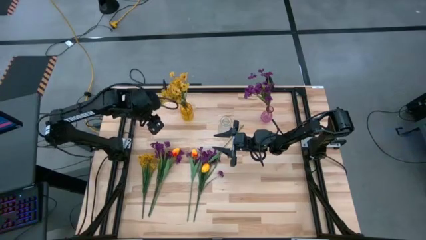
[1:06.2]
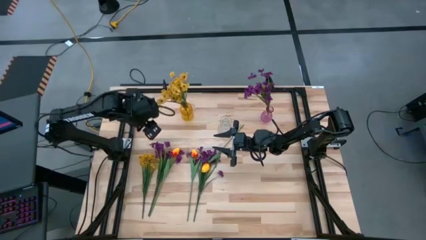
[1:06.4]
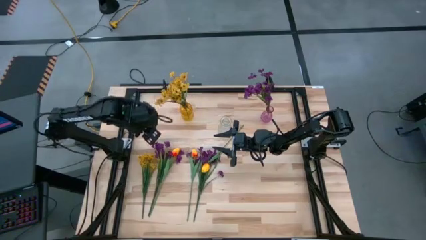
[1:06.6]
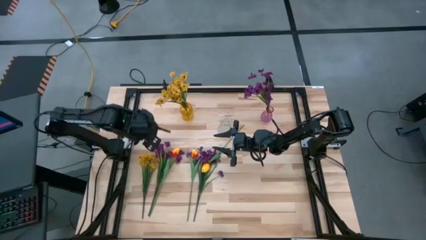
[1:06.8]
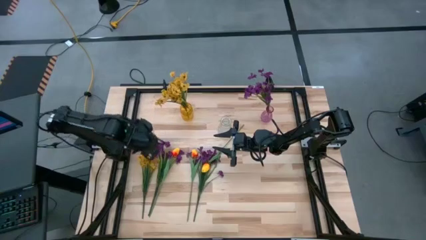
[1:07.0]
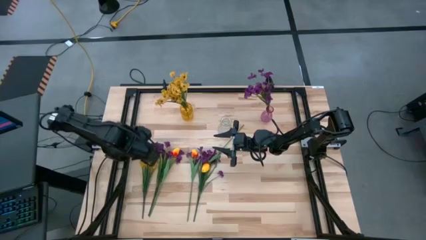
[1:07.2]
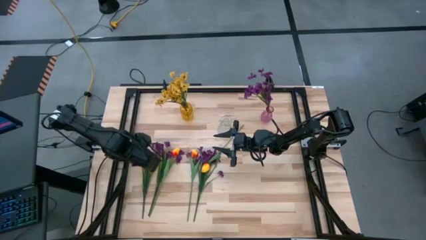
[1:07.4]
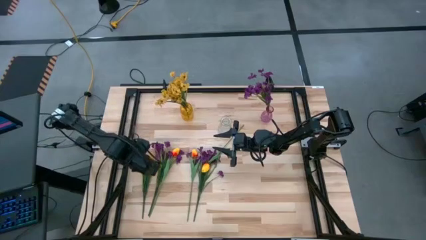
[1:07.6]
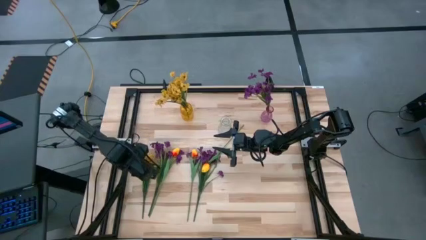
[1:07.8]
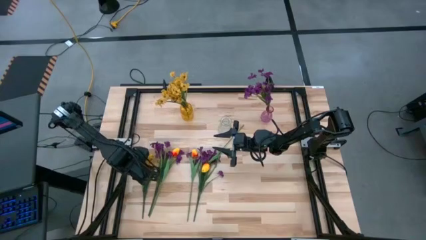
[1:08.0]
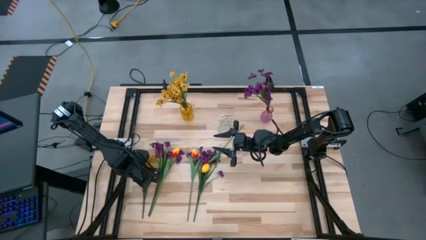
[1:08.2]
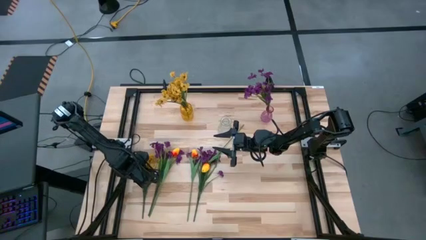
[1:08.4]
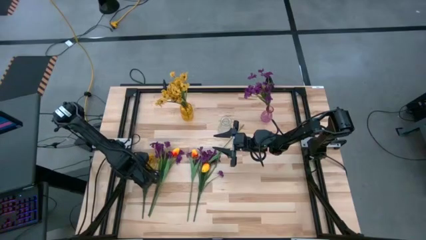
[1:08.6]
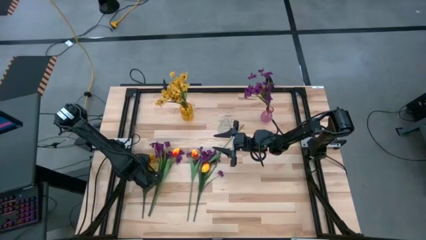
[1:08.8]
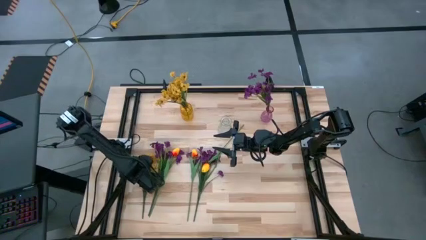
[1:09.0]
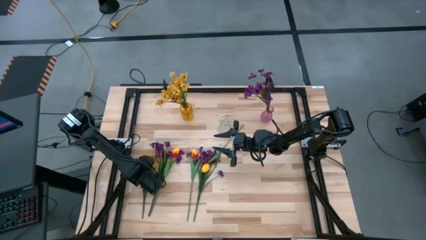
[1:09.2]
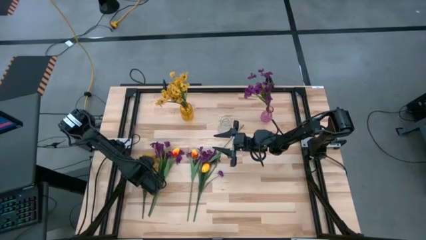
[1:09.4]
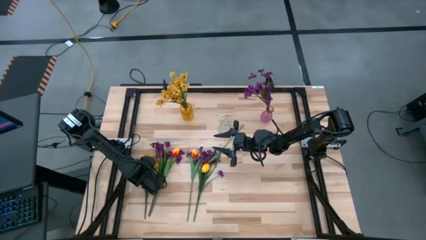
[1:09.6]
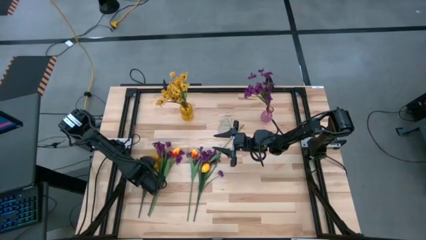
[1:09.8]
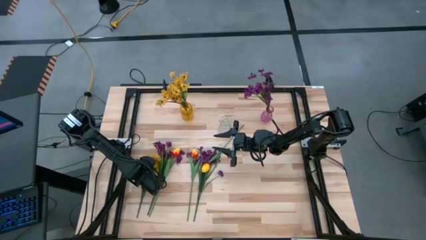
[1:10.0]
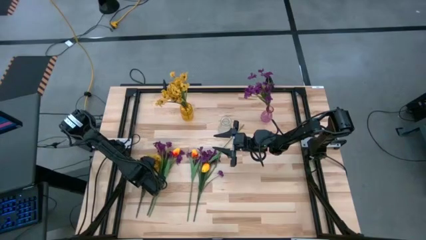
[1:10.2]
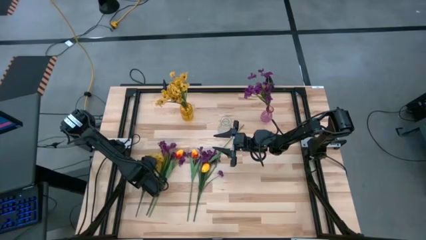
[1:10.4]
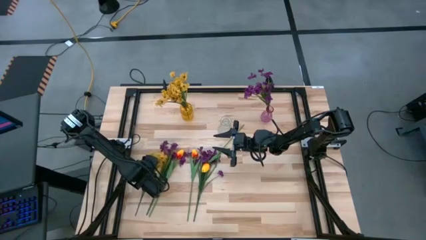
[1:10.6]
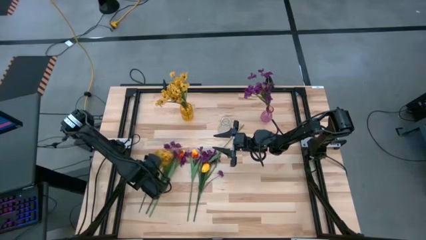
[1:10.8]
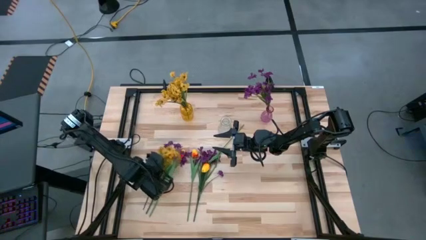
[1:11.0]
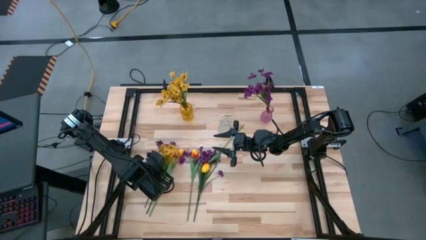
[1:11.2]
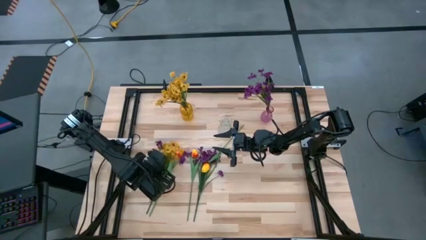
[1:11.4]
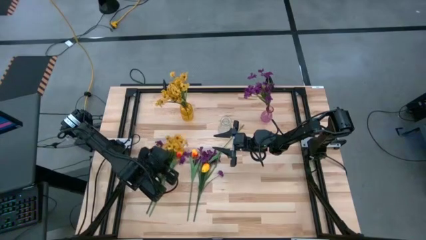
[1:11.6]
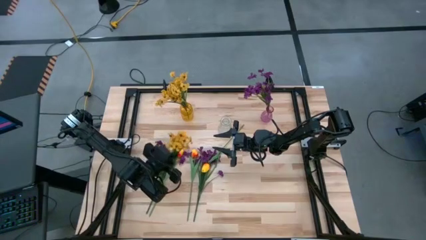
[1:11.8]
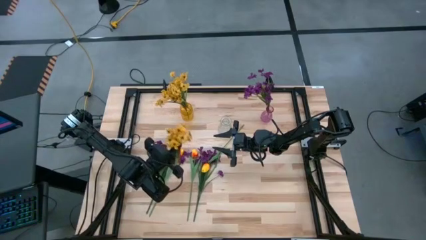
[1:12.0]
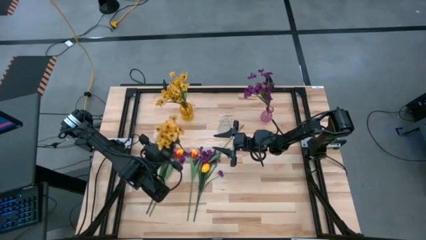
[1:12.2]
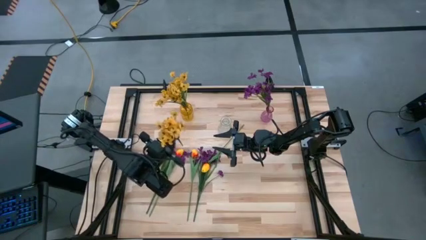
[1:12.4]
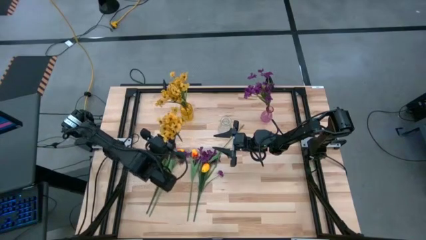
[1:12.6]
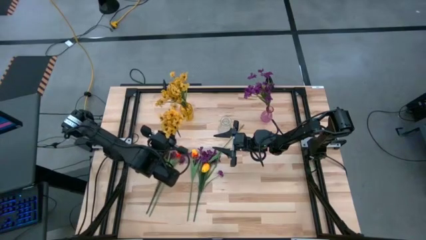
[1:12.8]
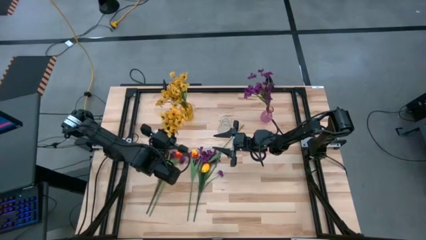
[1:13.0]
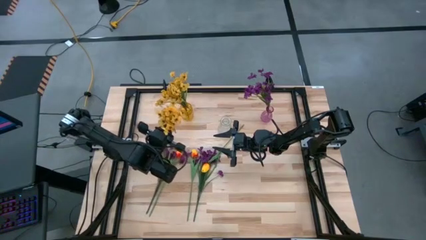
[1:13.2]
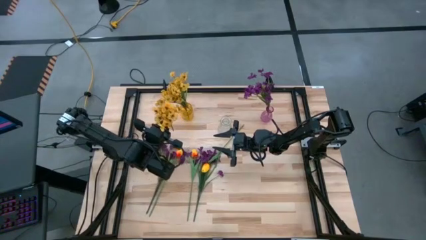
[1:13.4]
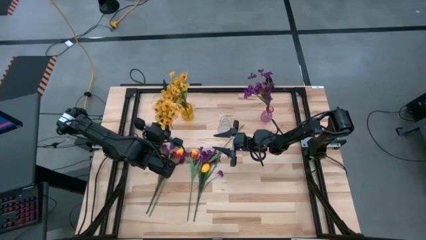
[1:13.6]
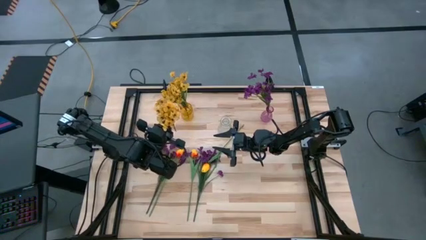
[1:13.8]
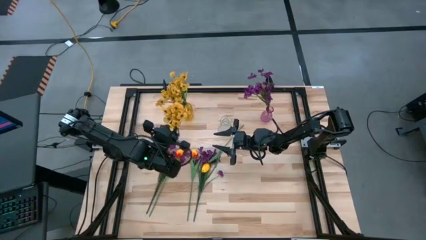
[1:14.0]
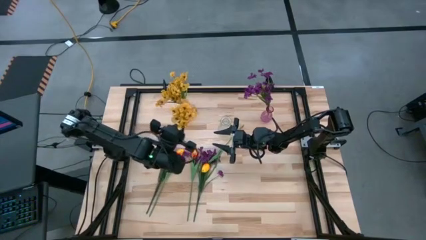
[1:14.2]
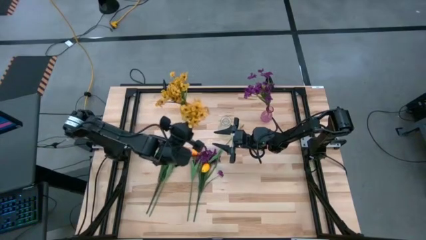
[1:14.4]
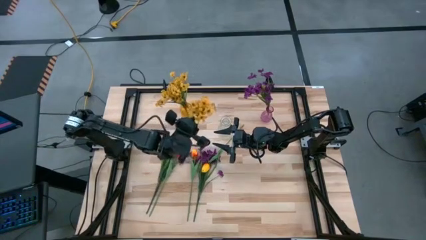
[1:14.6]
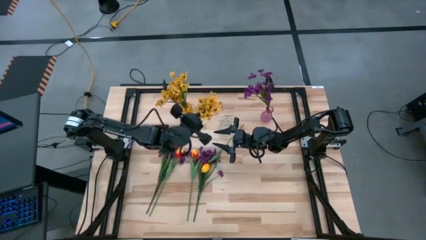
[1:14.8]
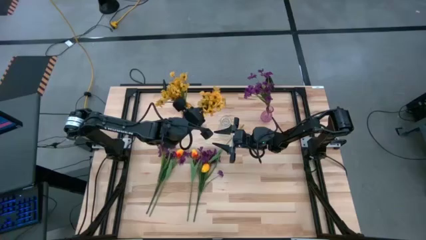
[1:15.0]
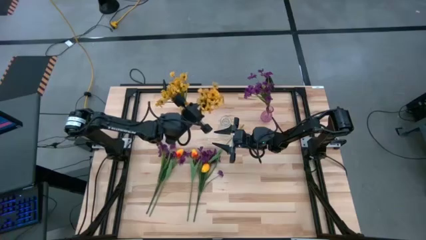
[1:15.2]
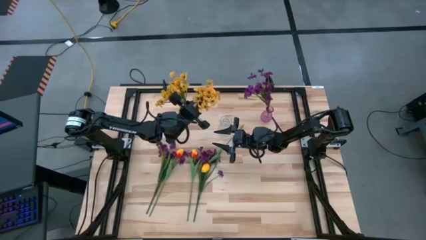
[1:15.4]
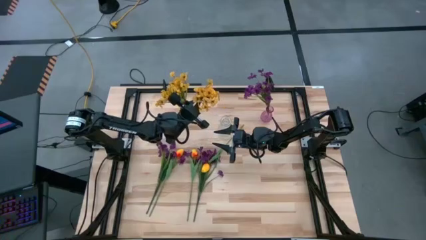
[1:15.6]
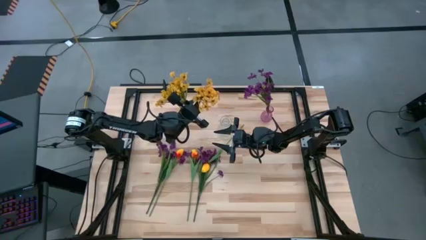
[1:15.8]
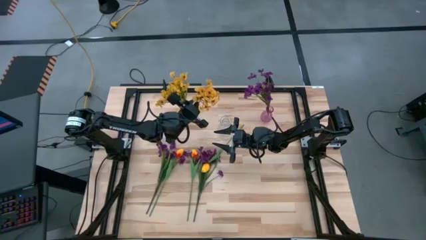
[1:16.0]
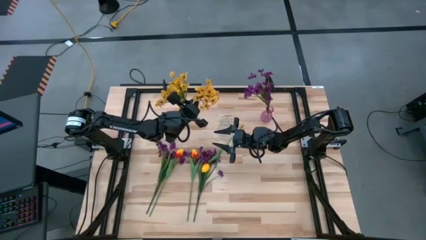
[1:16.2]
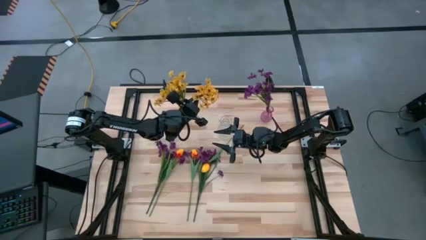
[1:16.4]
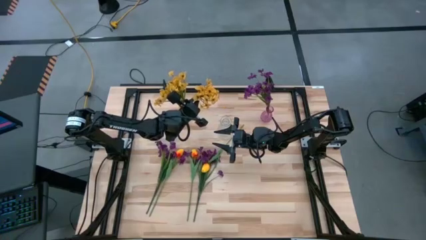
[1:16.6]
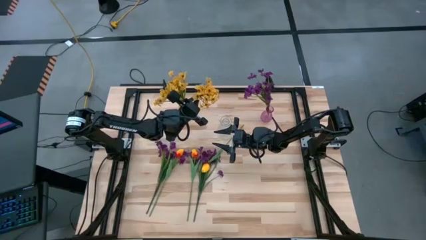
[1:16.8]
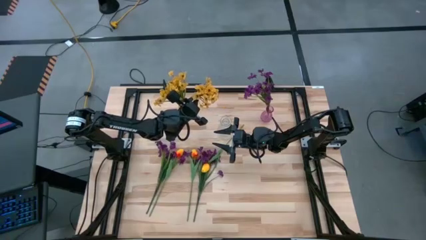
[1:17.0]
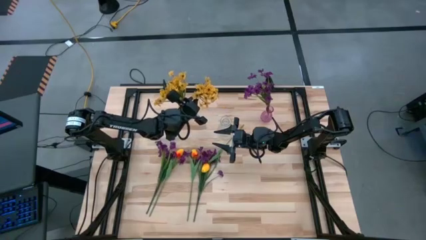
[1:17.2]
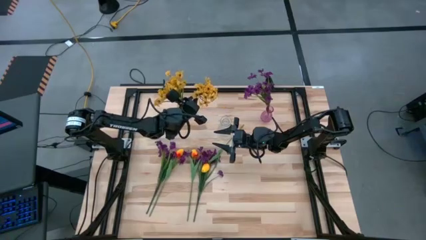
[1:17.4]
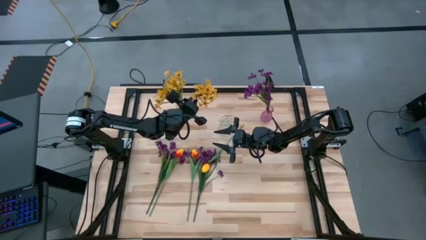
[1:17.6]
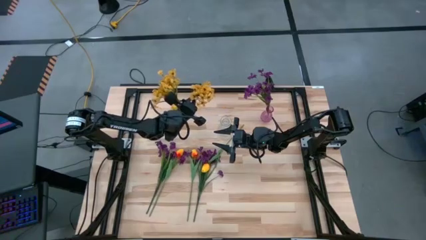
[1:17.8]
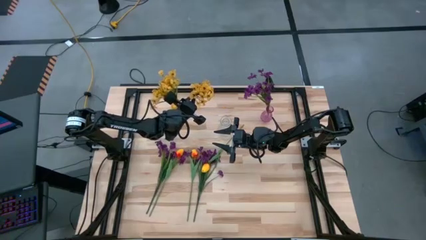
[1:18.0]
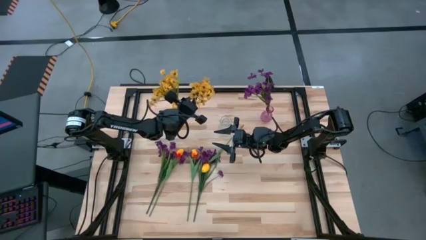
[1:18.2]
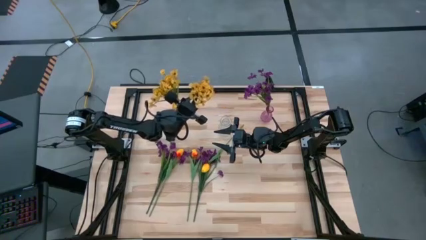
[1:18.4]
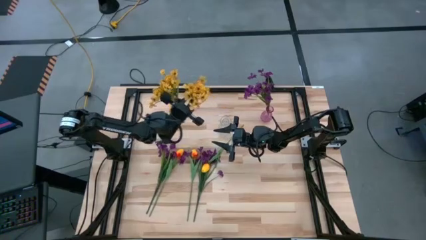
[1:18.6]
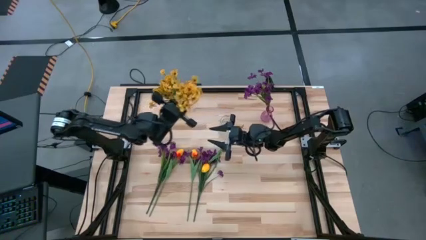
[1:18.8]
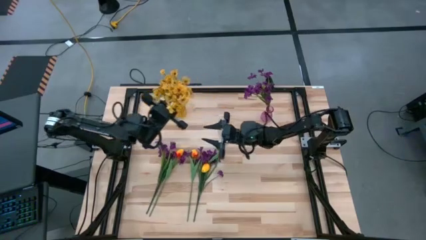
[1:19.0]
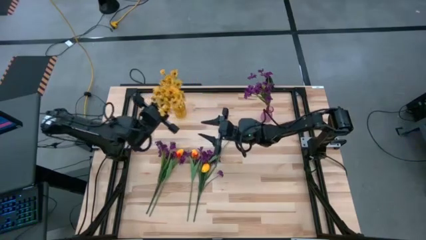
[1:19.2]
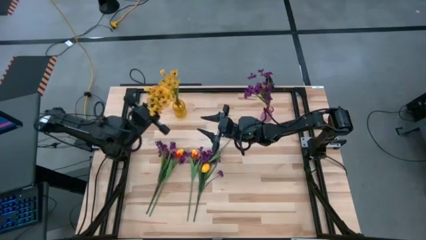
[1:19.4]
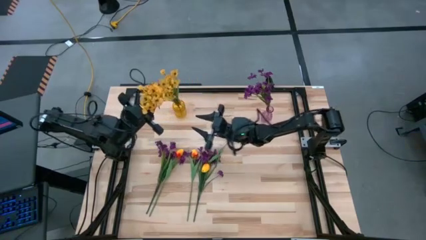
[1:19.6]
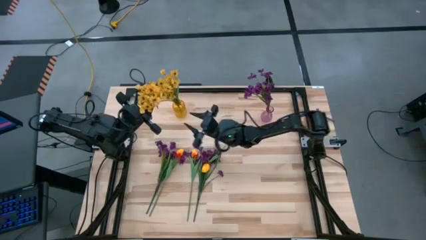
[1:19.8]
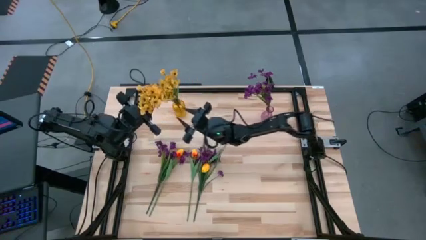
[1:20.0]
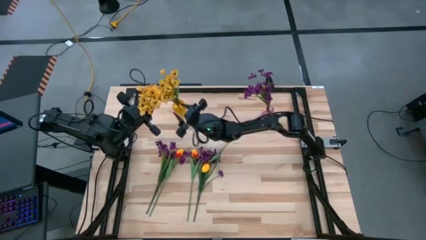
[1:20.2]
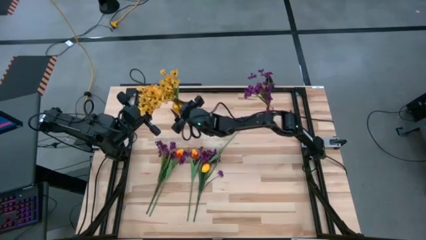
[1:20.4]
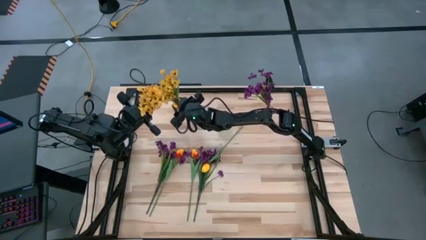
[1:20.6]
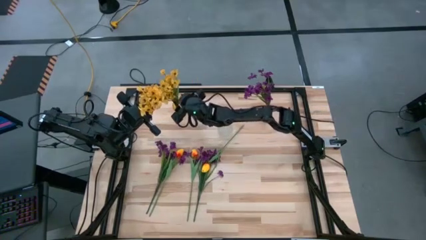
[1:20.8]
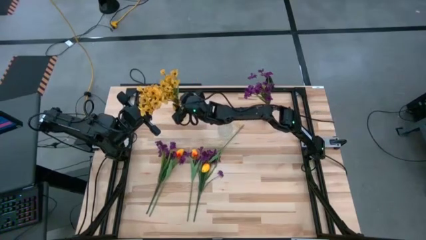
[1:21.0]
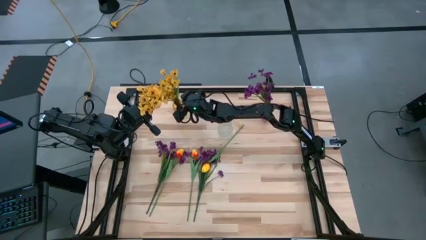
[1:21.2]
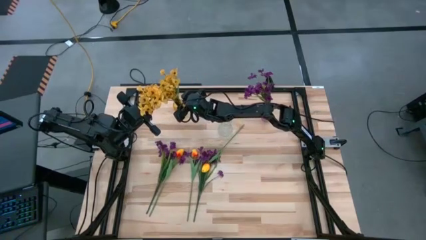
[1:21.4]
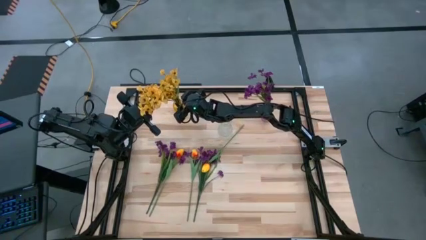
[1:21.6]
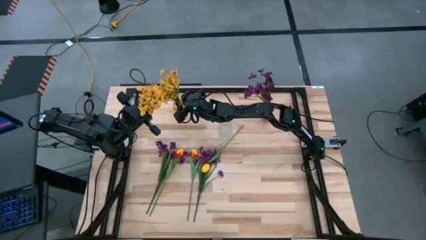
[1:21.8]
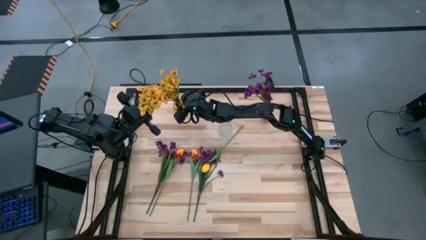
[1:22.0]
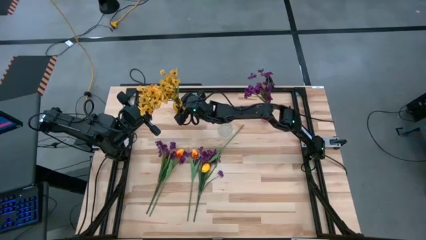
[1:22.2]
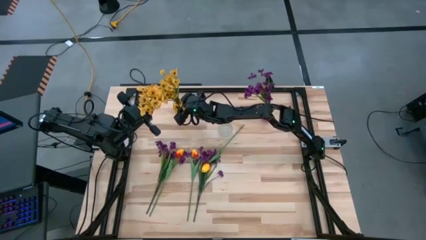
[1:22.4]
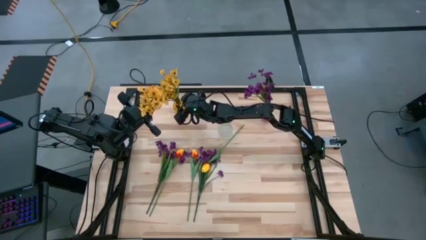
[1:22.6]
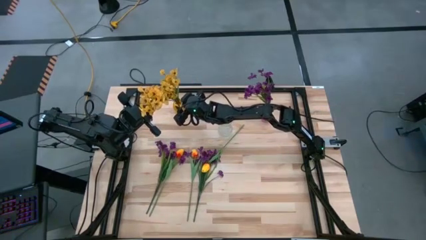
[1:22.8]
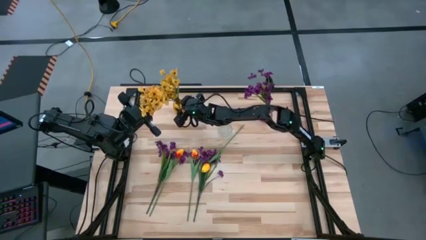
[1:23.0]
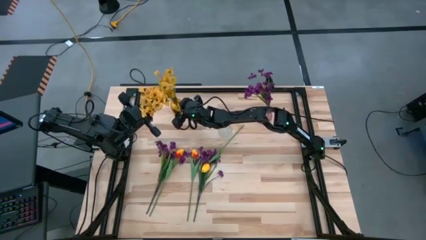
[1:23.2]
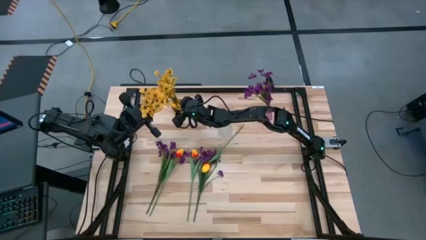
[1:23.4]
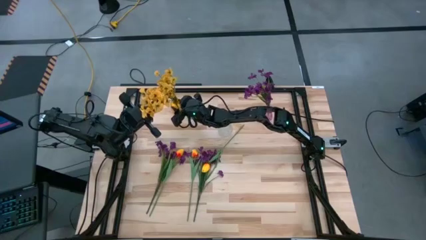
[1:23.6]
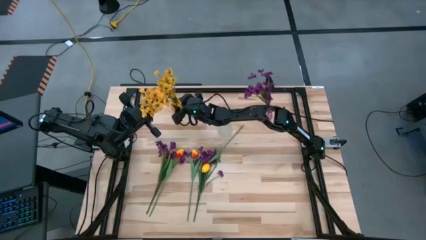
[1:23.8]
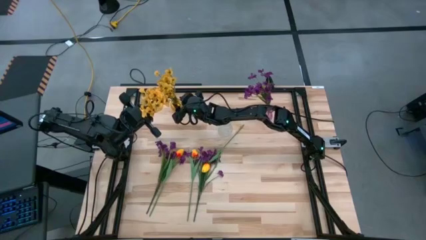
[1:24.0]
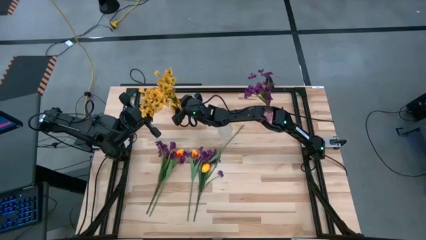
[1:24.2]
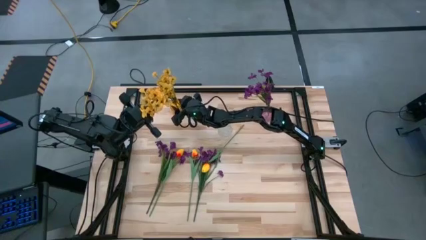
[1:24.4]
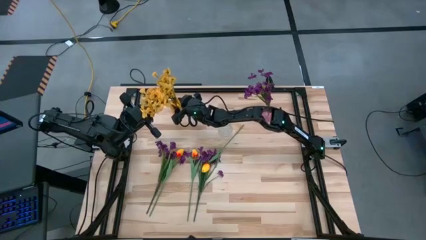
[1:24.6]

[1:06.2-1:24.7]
Task: Sort flowers into vase by color
Put the yellow flowers into the yellow vase
